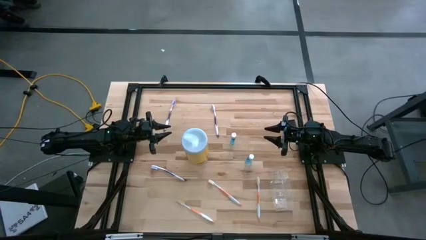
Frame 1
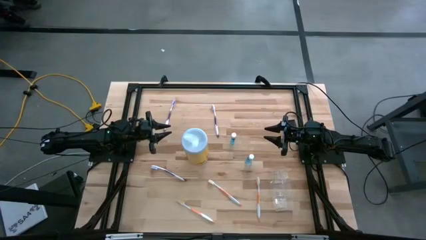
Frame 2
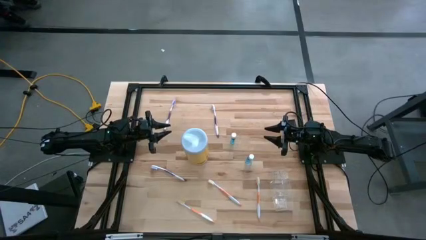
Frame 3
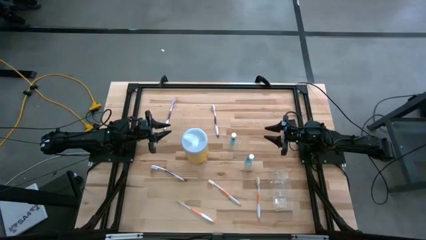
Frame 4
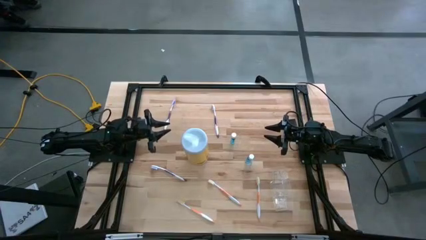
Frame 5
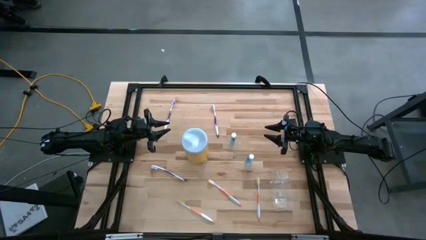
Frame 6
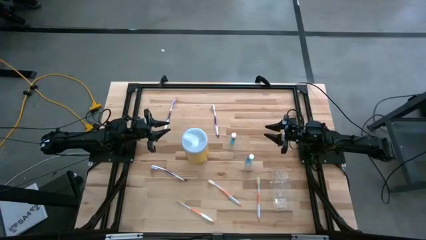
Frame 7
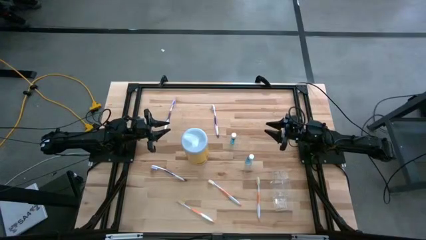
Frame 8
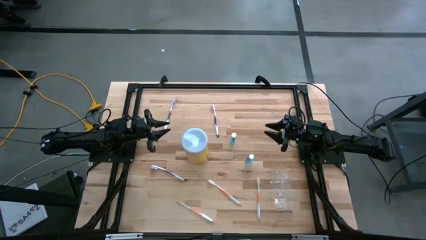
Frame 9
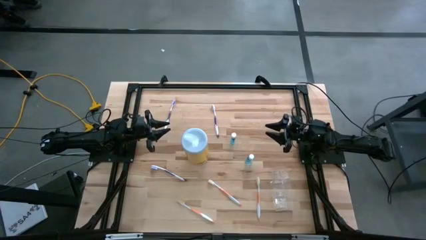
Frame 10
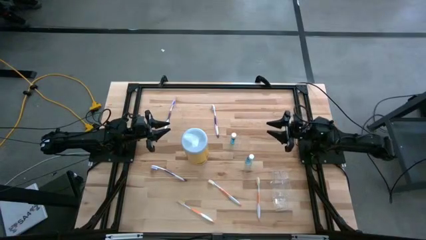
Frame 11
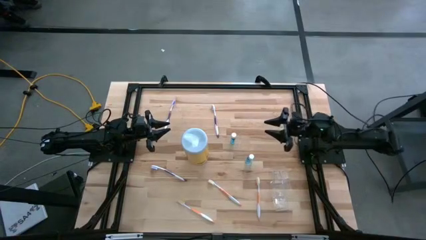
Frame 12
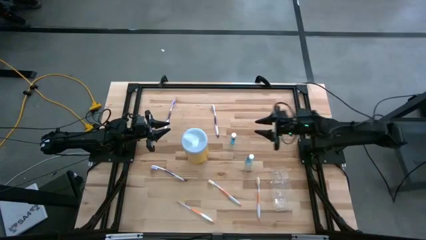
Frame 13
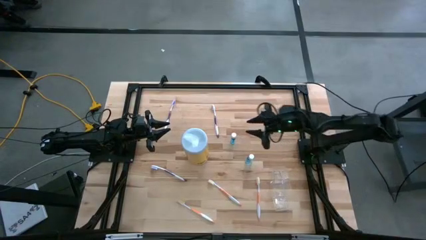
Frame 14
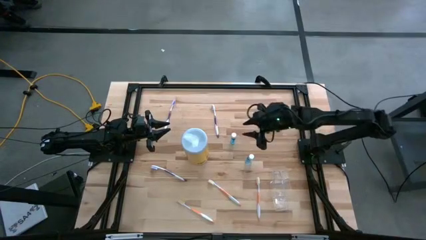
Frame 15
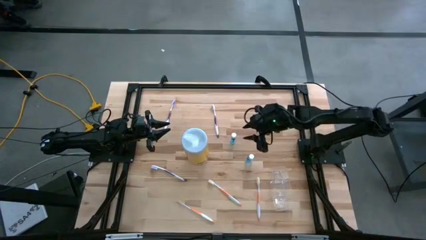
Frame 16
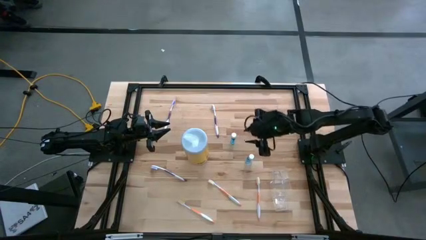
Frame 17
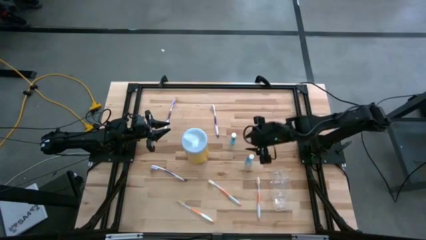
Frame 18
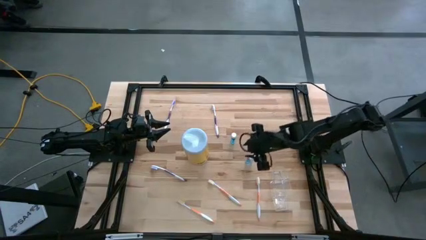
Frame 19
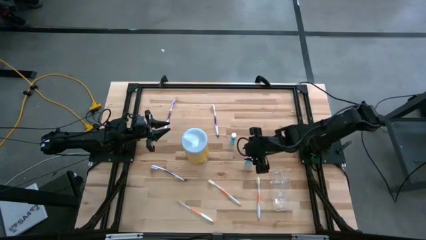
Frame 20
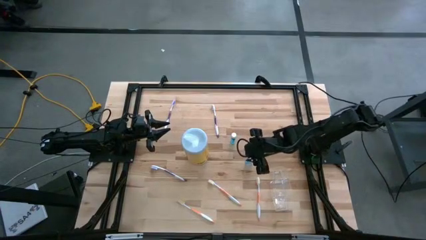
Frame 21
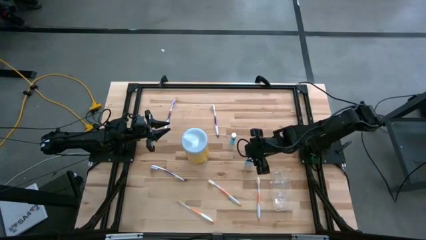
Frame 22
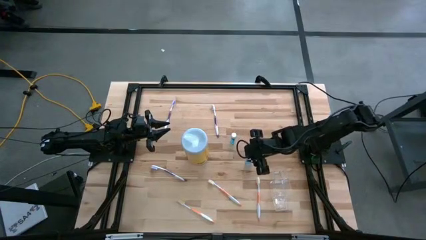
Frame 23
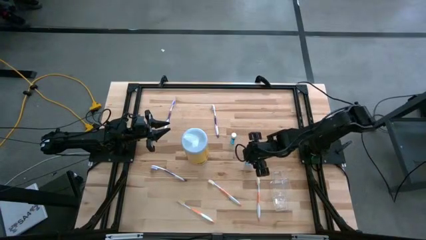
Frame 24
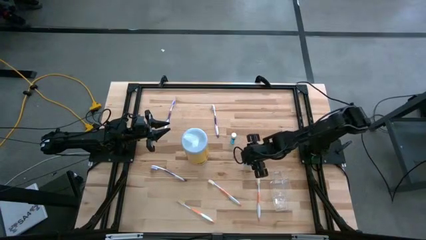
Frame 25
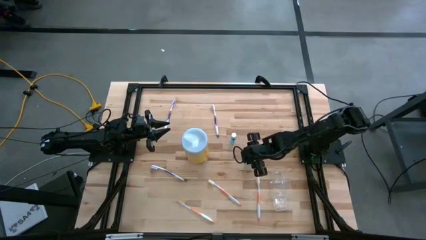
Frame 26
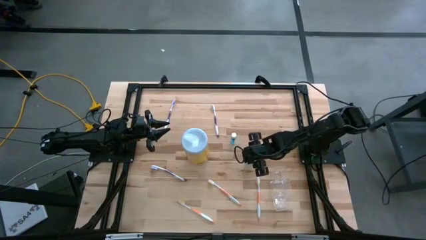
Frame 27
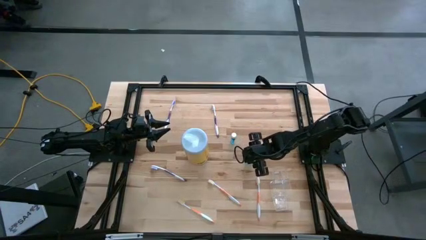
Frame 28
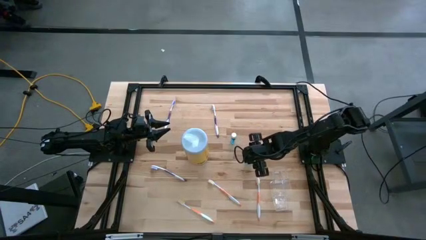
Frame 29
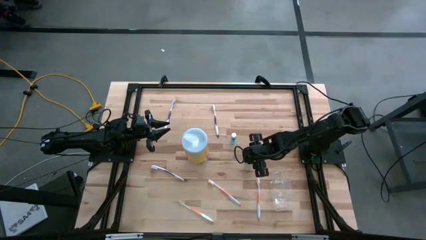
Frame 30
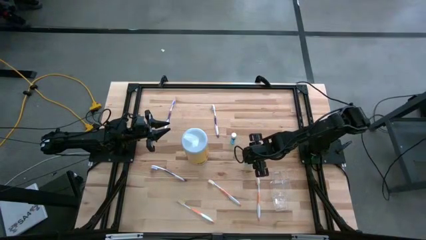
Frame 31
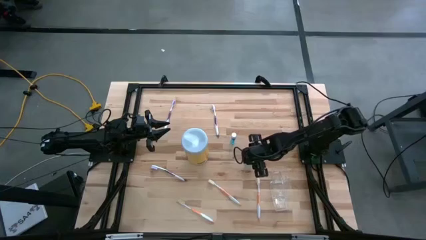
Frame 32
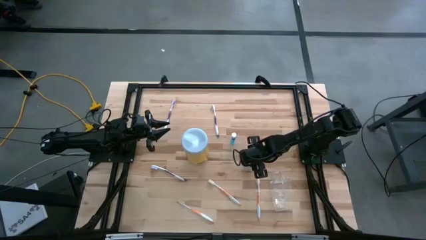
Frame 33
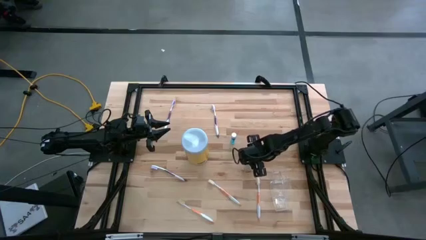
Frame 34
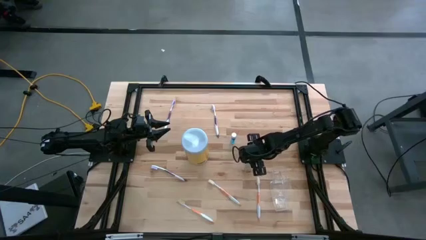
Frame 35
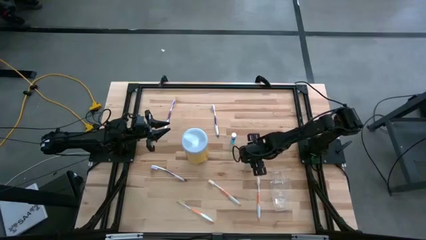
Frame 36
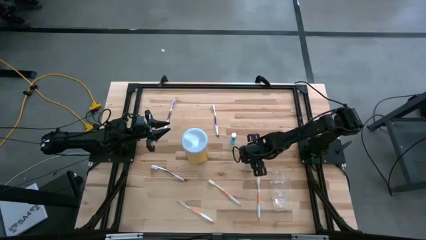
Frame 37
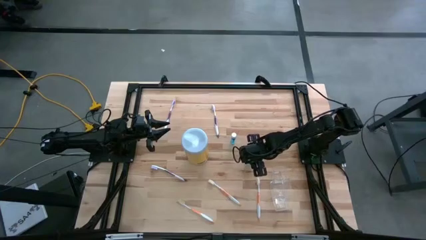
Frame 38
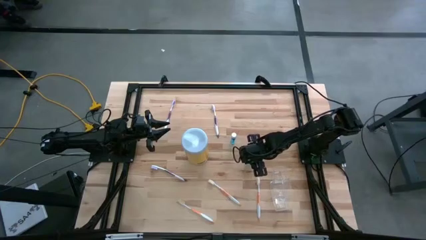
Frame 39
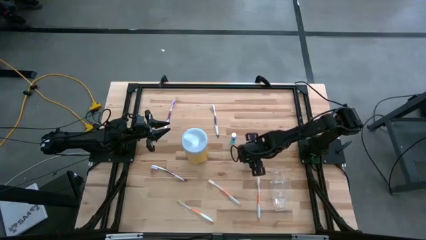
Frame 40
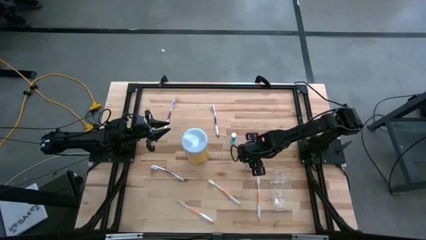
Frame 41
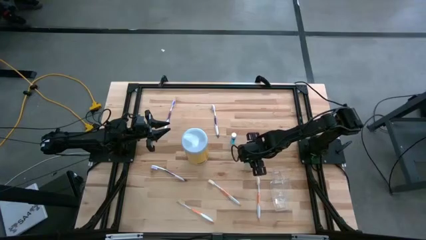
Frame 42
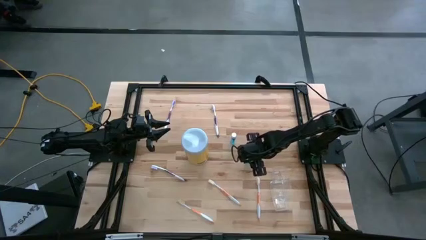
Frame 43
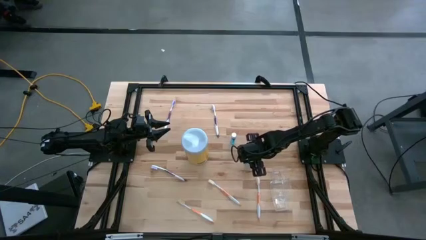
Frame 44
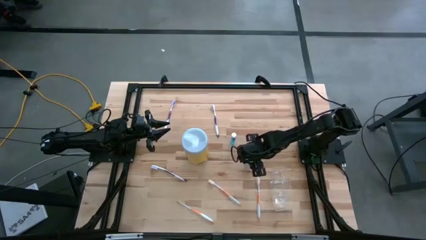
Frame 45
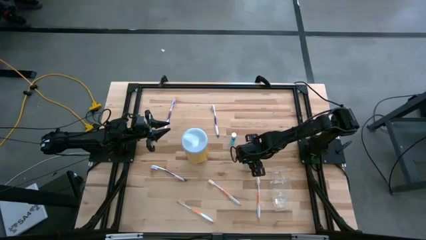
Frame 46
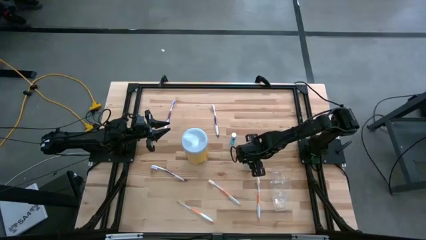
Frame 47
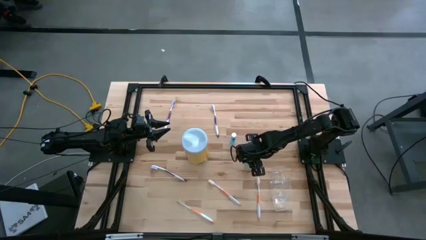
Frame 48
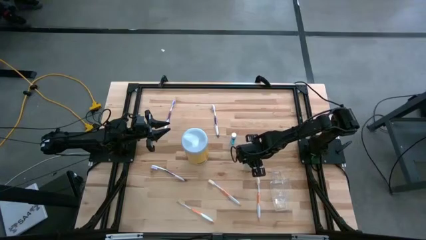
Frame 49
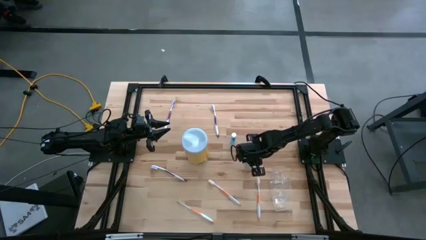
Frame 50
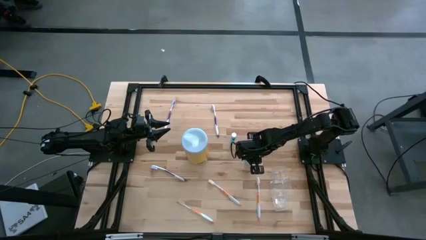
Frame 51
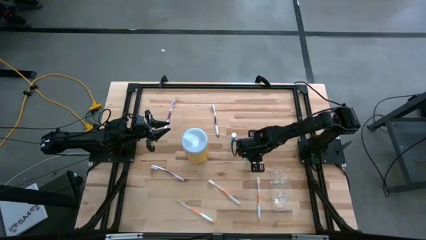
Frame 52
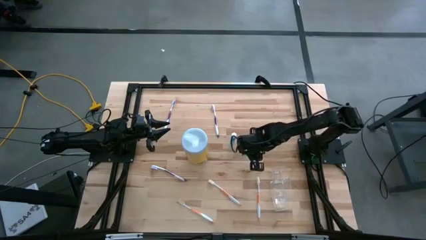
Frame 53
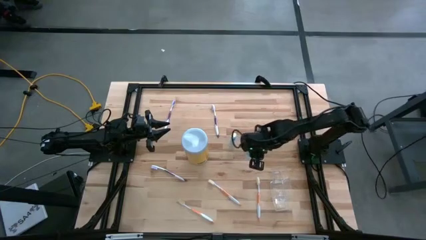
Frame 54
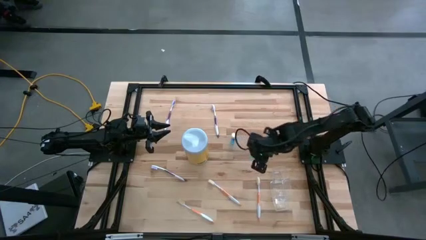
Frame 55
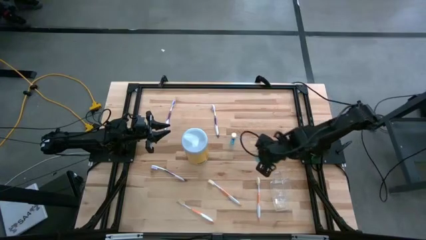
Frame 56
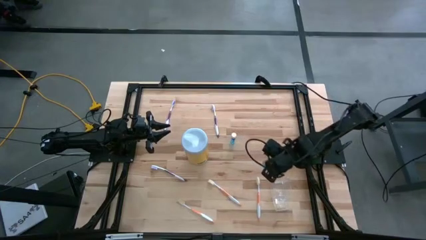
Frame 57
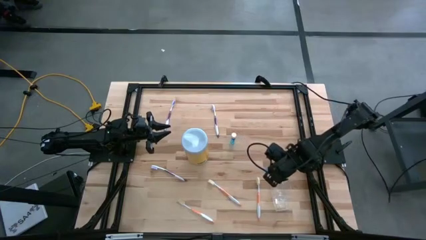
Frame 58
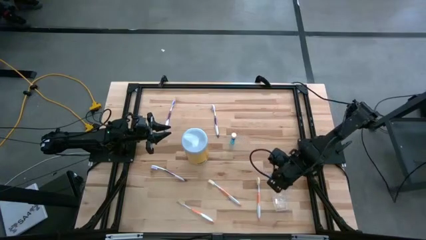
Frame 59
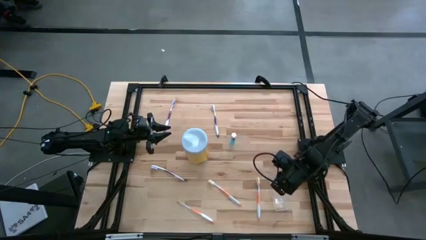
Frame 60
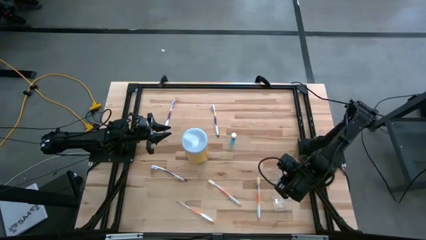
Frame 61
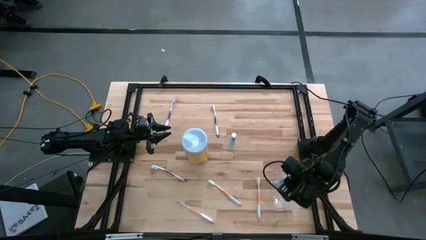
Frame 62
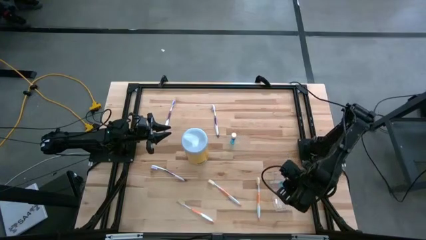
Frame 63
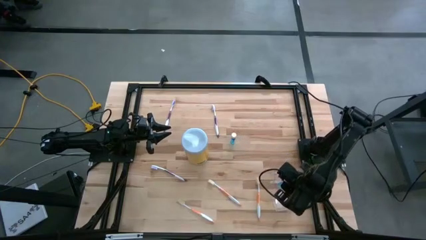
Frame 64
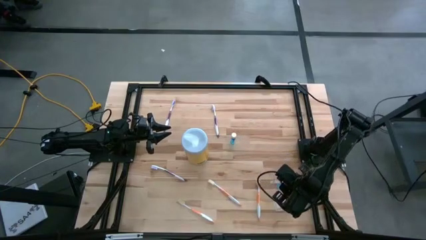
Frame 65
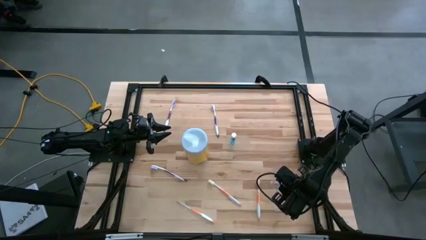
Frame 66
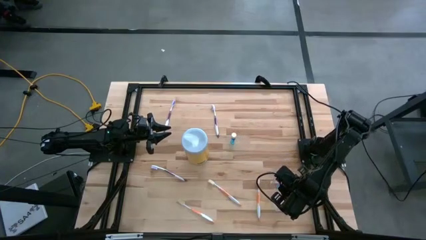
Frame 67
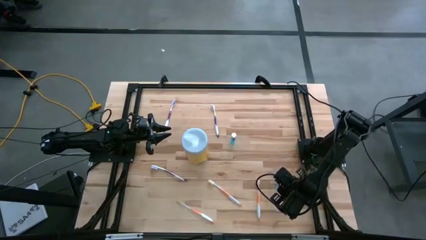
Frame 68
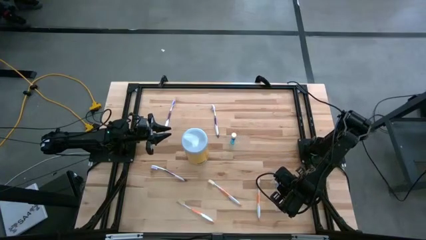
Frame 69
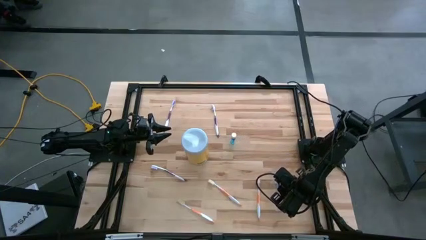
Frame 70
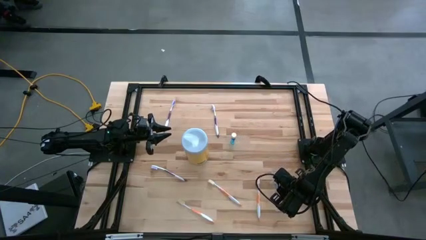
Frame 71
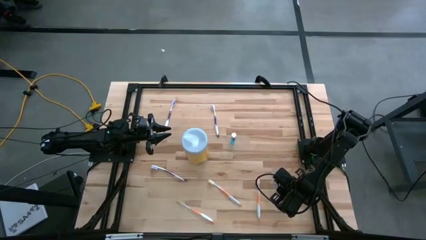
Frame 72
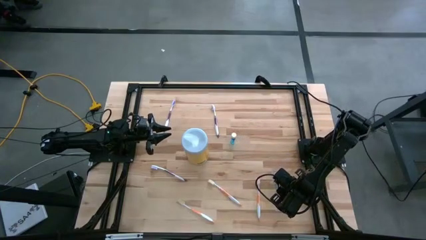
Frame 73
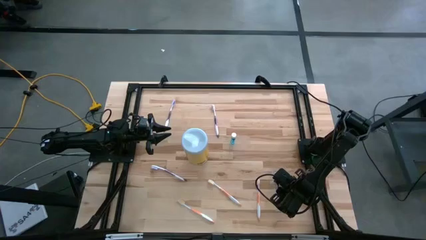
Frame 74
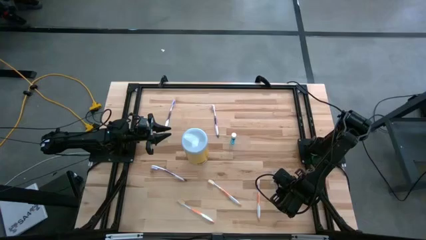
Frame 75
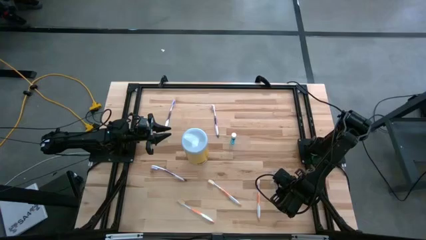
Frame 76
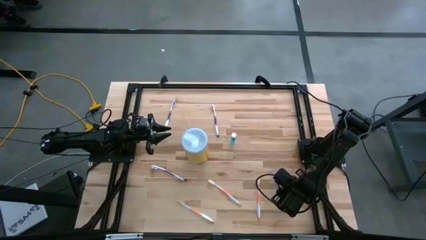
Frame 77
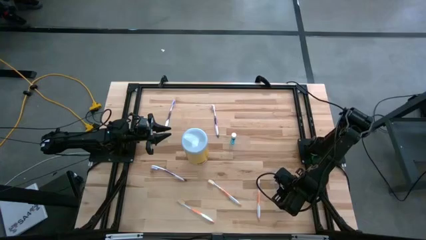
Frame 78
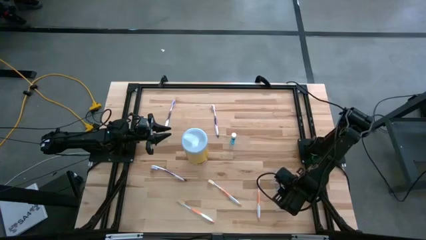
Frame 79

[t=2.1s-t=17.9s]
Task: Pick & Place toothbrushing station
Put the bottom blue mouthwash in the middle section of the transparent organizer
